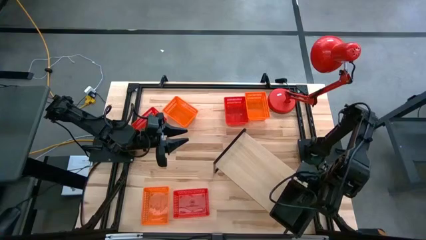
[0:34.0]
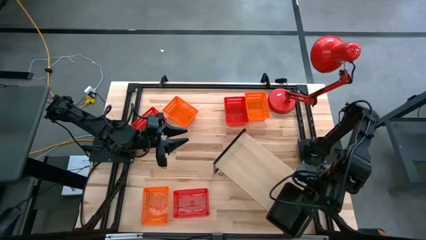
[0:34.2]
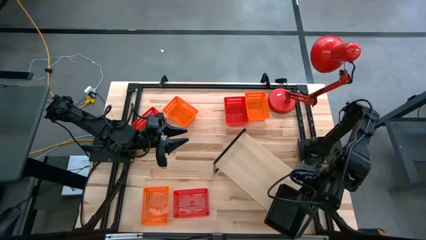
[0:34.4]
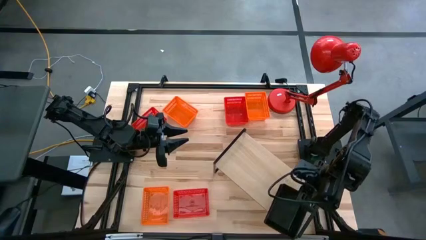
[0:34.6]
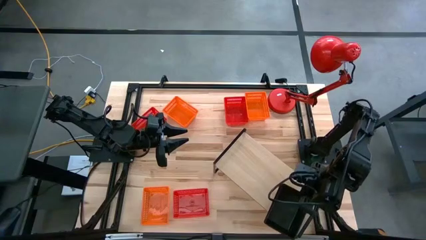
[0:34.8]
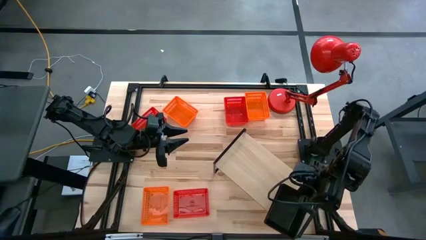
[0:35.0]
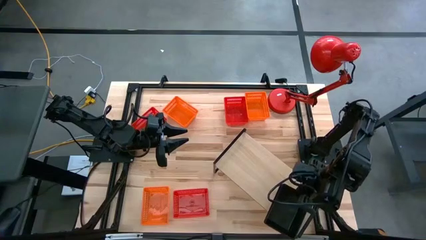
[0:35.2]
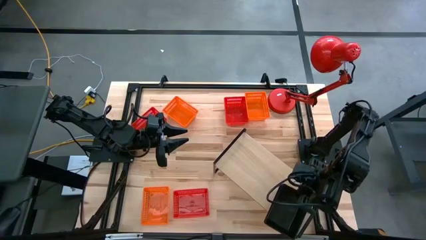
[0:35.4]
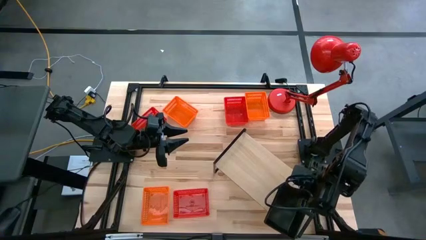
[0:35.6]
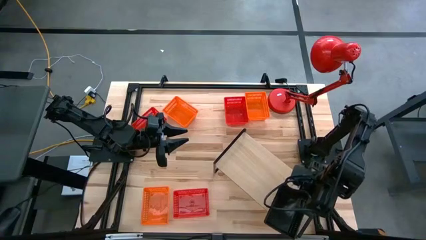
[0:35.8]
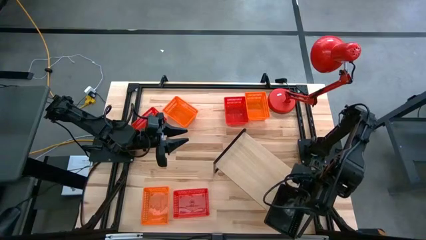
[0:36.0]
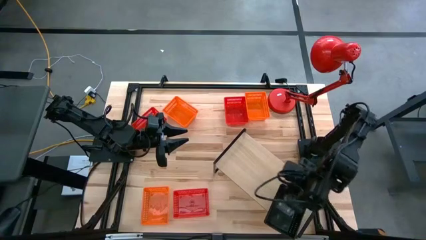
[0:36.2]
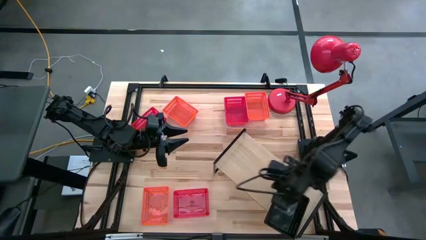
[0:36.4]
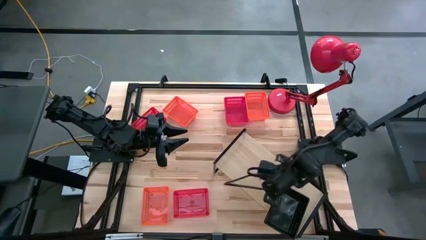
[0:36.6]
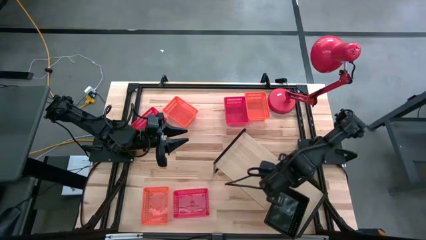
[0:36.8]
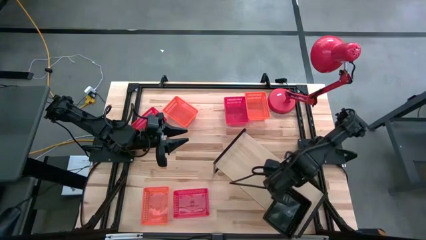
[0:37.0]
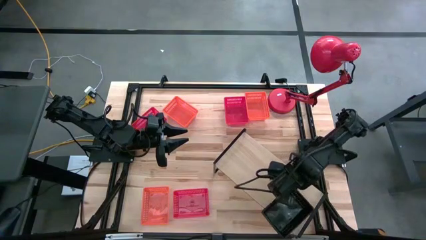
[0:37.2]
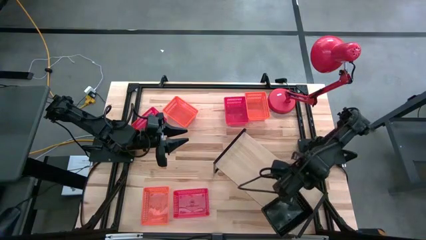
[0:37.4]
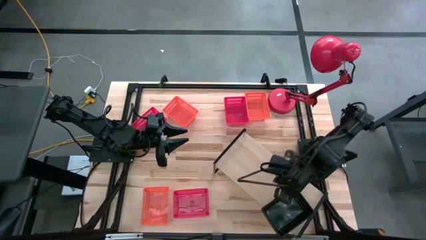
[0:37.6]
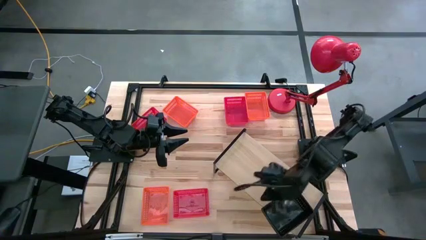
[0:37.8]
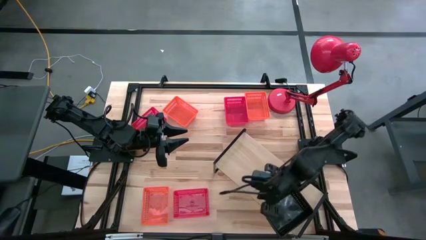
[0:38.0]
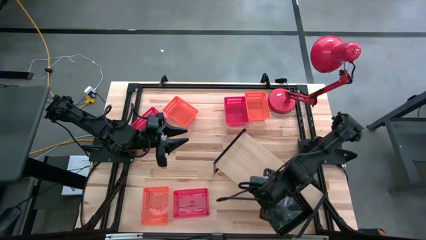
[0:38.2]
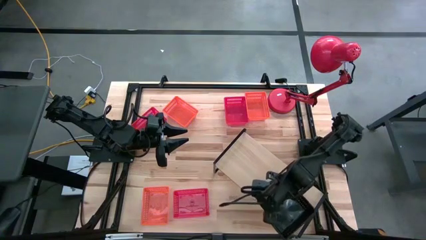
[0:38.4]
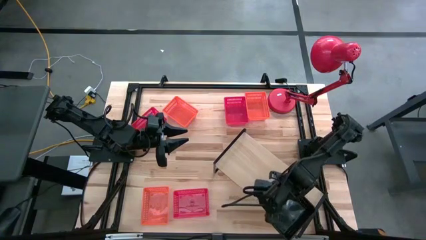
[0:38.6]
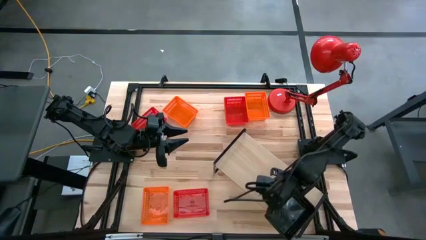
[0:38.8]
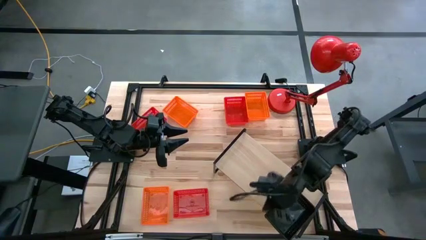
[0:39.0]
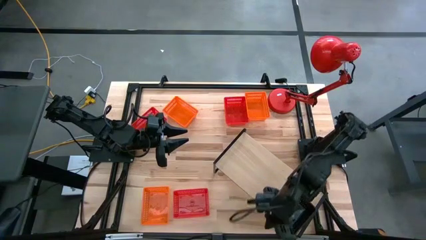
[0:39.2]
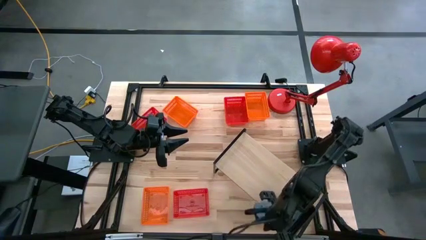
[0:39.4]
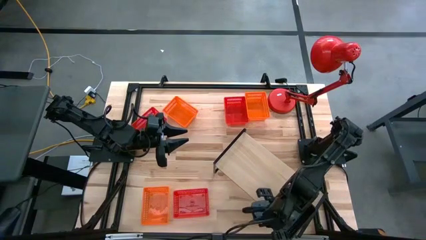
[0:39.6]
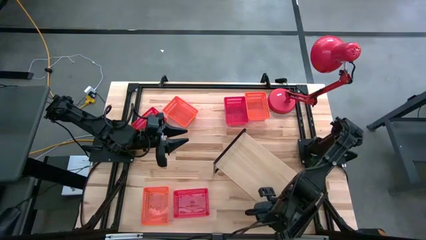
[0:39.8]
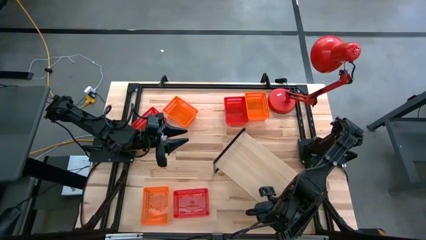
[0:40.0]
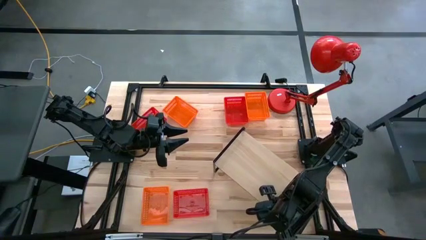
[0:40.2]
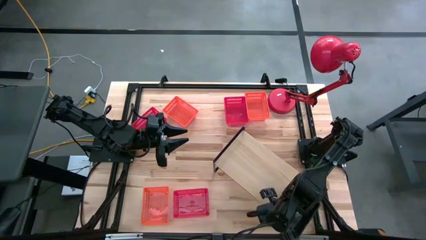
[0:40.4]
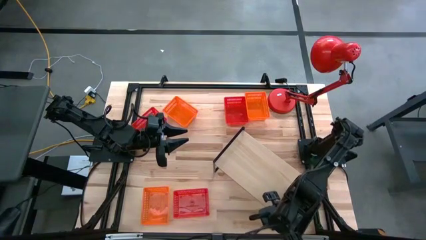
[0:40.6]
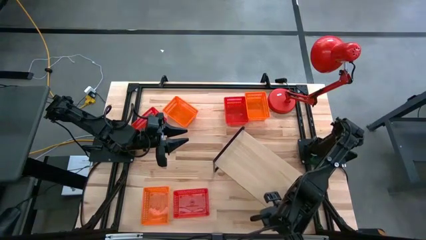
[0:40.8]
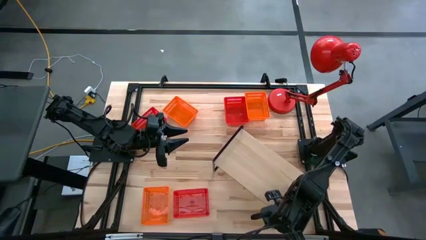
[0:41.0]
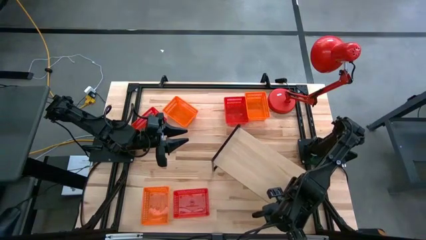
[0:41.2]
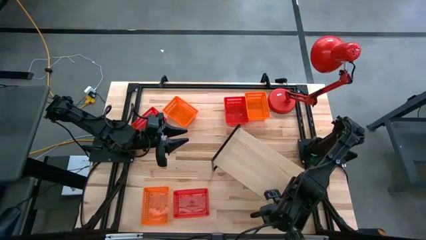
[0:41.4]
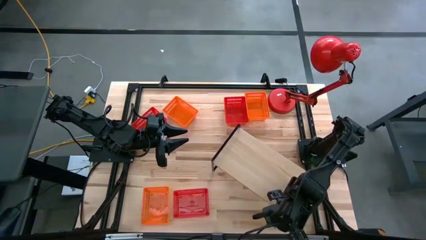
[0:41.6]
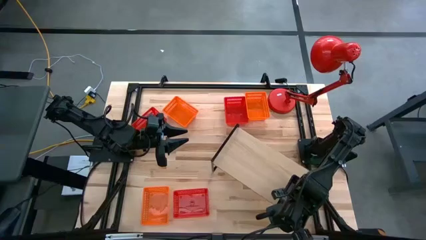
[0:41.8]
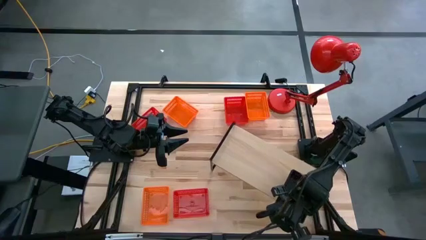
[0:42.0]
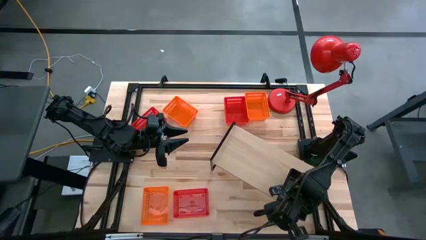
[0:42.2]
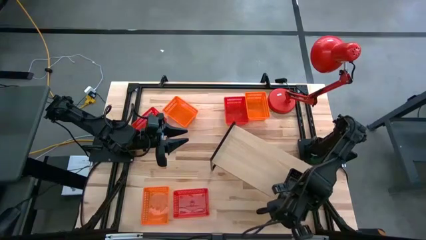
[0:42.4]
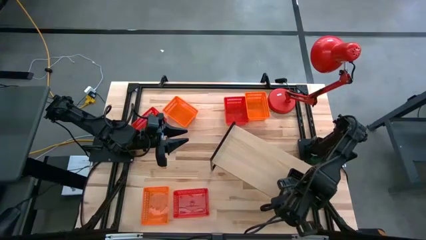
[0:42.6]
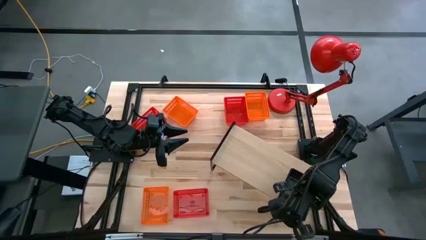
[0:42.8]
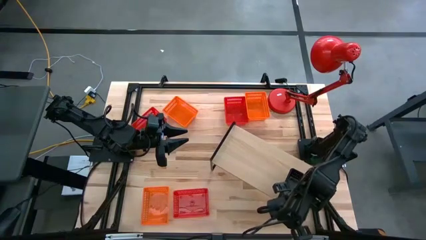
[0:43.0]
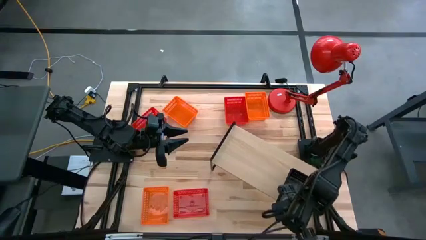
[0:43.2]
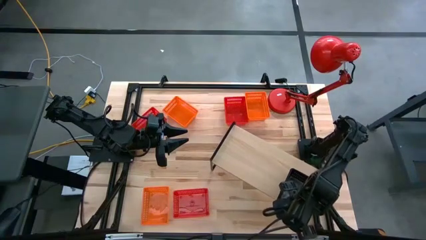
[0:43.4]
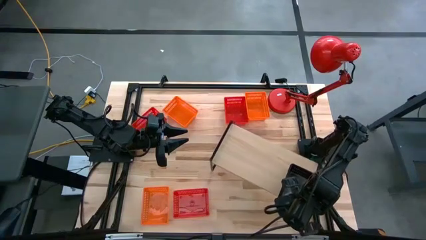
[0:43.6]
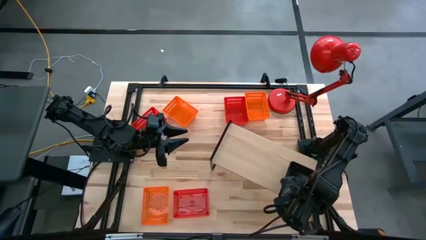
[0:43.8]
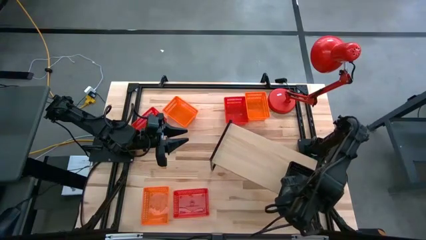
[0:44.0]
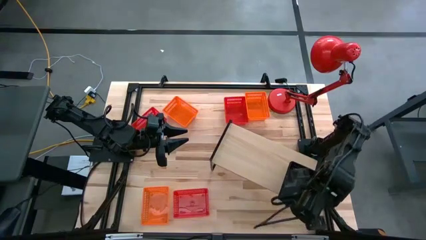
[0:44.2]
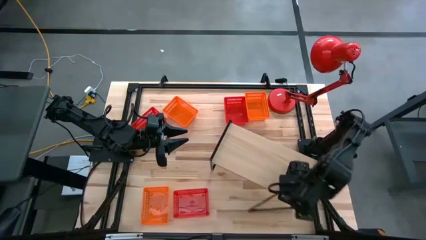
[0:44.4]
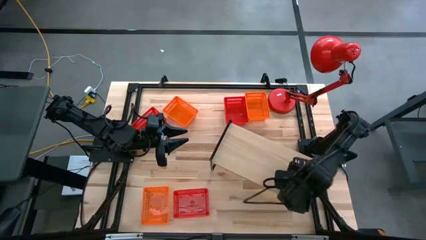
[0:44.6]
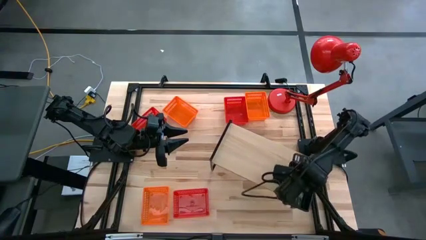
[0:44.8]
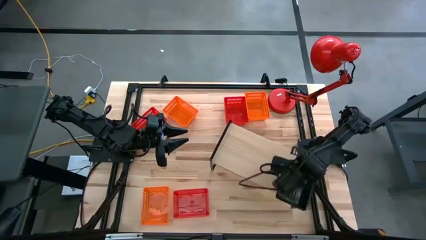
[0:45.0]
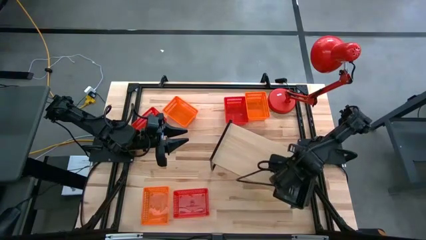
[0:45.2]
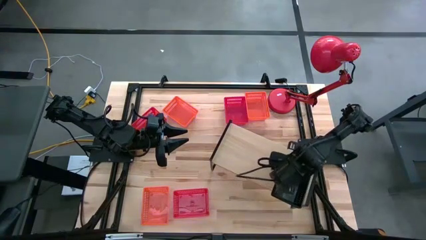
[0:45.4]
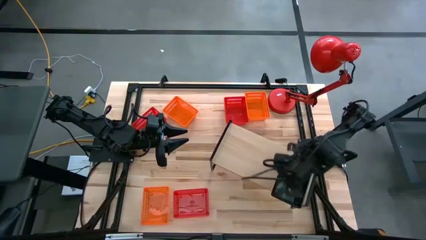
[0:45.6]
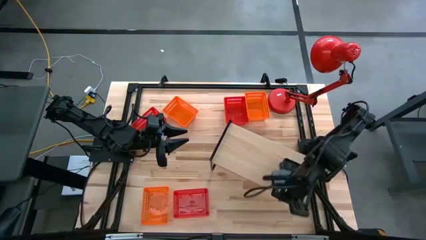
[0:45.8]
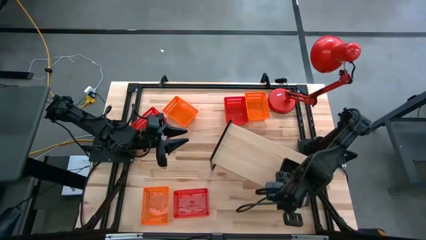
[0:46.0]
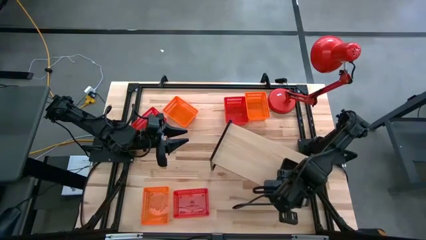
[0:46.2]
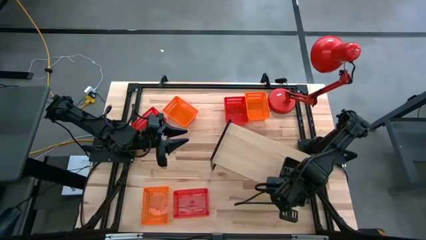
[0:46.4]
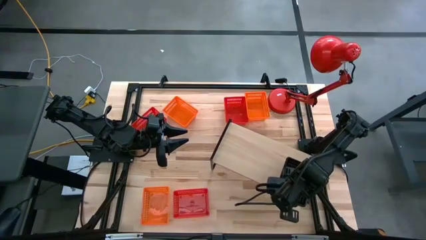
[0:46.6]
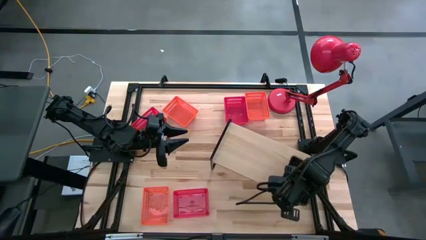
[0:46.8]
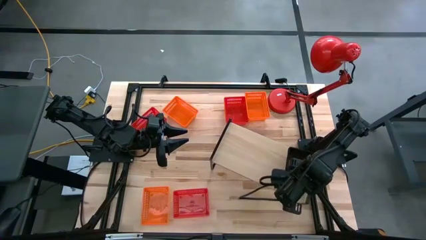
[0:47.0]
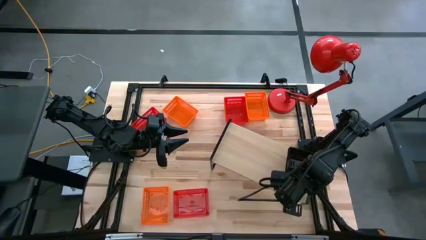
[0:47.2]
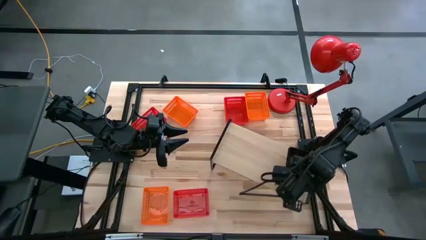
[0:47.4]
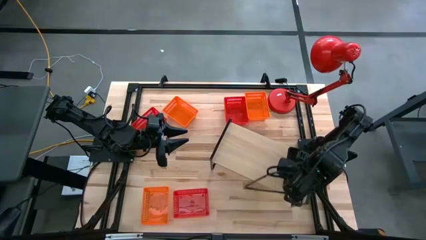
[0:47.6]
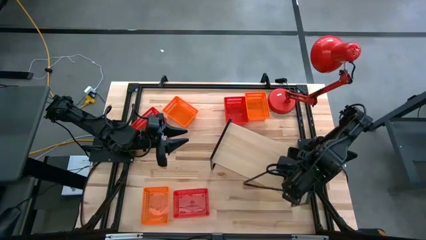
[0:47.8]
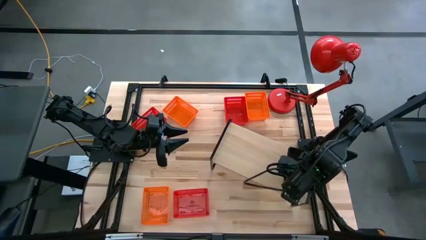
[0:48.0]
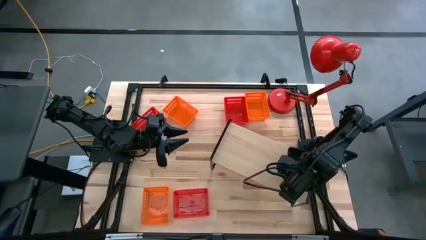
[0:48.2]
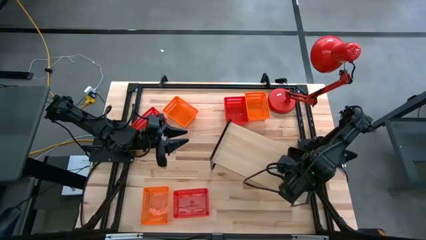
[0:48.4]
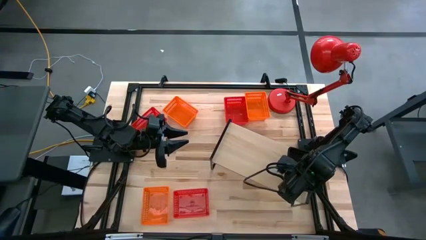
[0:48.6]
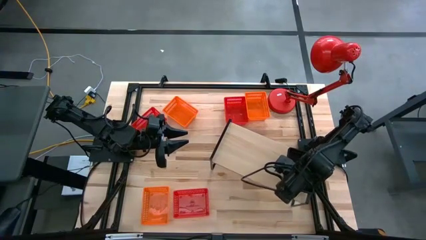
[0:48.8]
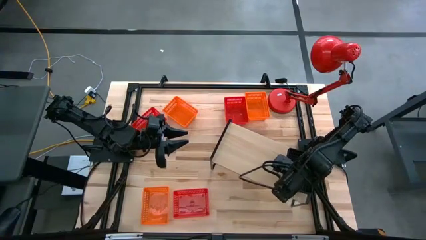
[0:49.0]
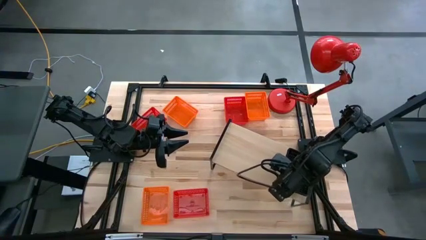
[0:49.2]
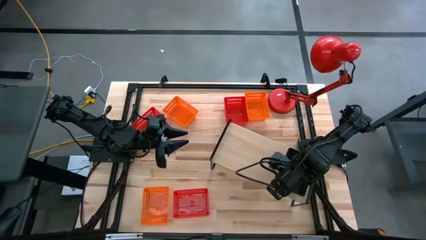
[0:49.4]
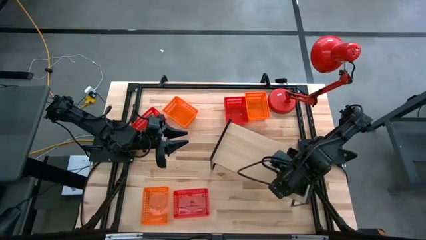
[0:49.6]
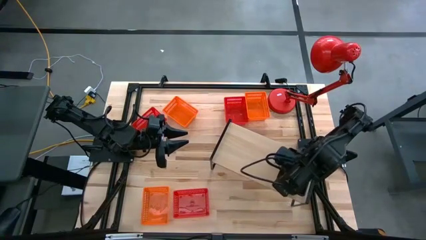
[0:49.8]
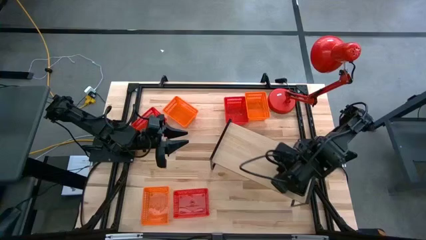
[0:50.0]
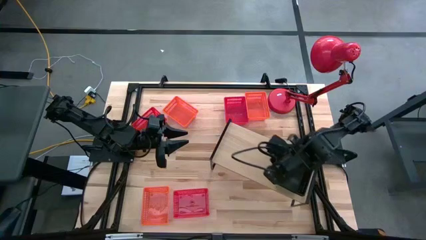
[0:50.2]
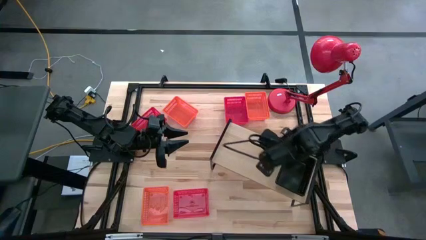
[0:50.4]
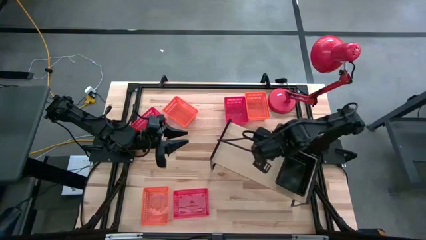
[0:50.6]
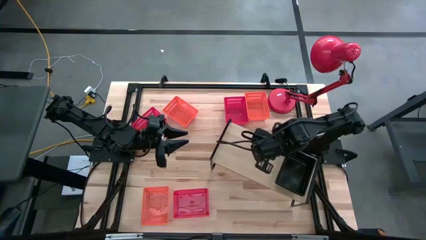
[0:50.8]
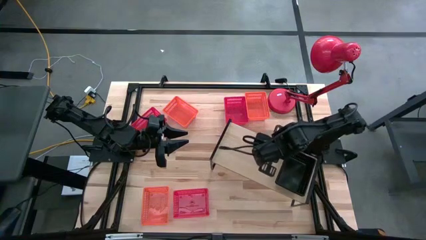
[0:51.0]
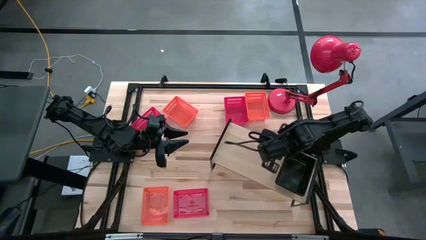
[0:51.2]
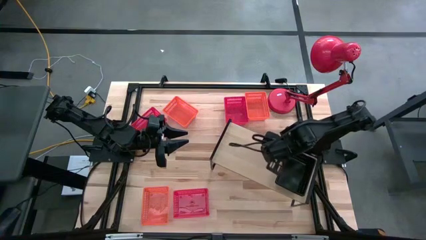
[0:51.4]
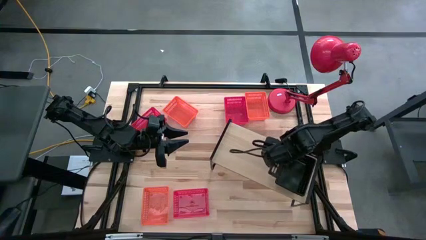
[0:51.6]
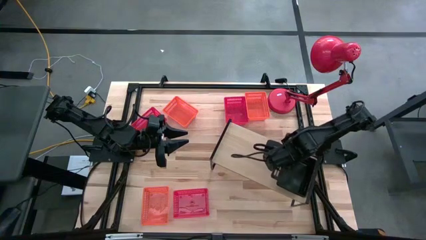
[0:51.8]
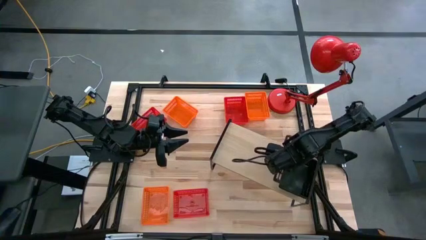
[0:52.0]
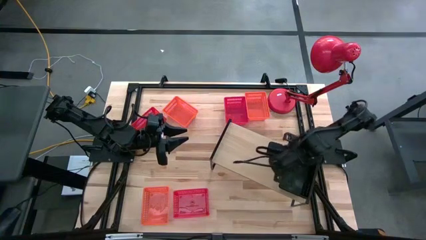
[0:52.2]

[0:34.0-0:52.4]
Task: Stack baskets on shelf by color
Adjust the stacked black bins on the shelf
